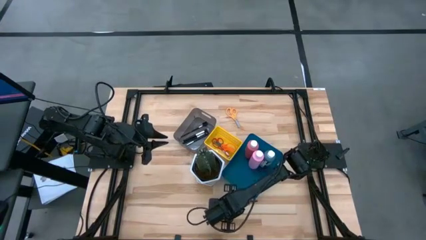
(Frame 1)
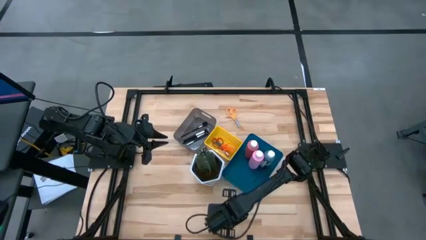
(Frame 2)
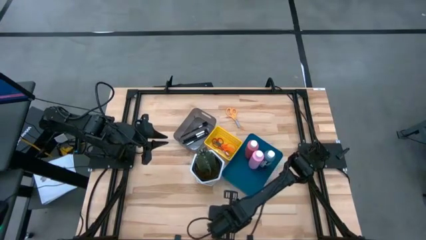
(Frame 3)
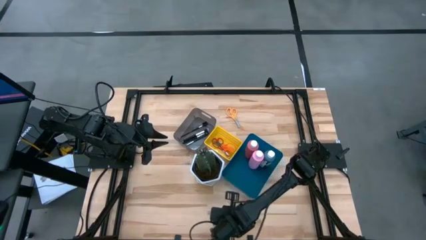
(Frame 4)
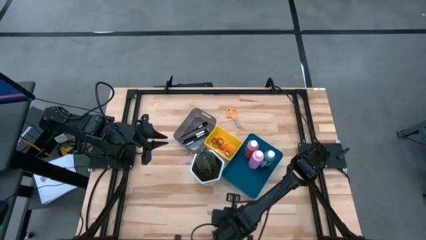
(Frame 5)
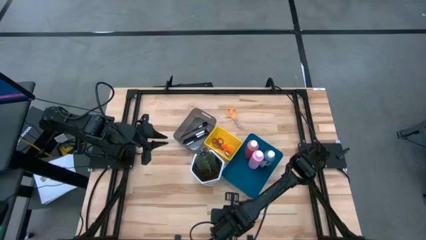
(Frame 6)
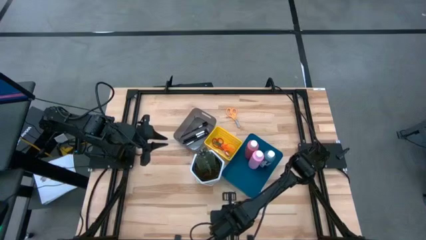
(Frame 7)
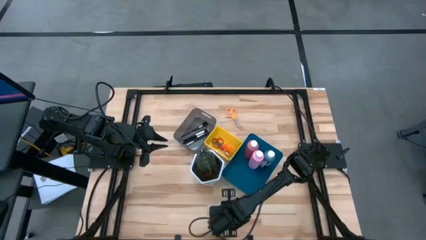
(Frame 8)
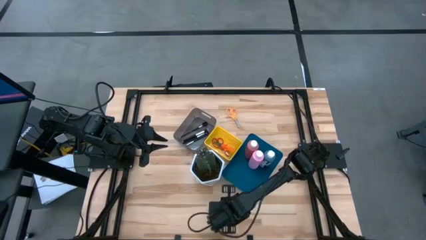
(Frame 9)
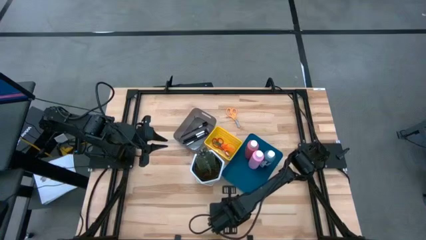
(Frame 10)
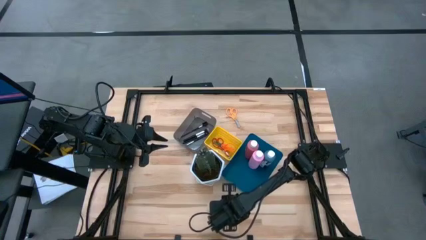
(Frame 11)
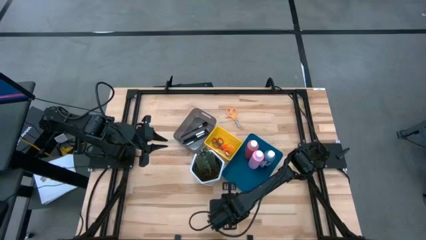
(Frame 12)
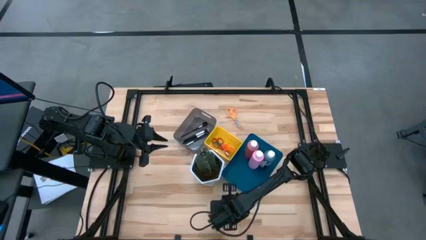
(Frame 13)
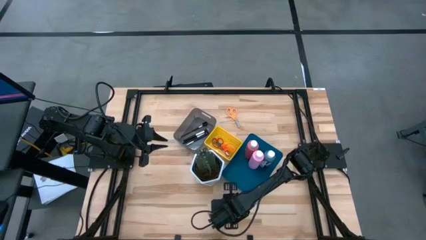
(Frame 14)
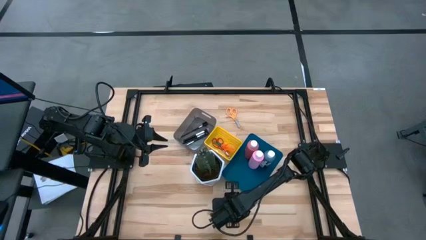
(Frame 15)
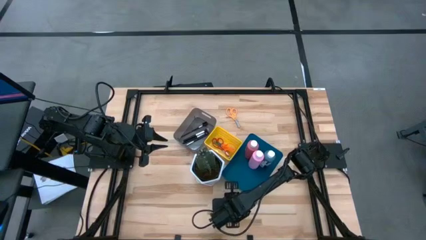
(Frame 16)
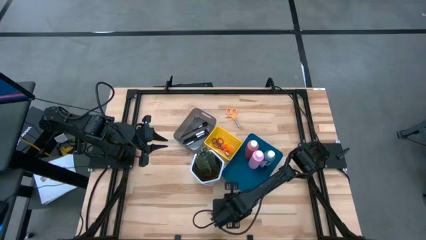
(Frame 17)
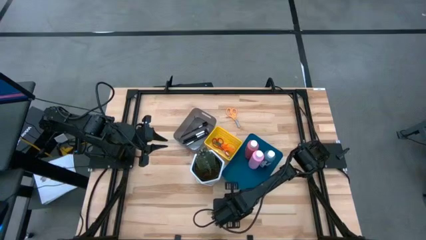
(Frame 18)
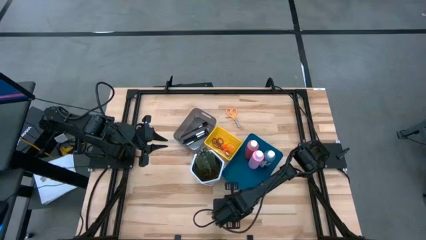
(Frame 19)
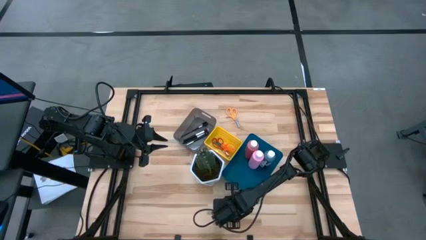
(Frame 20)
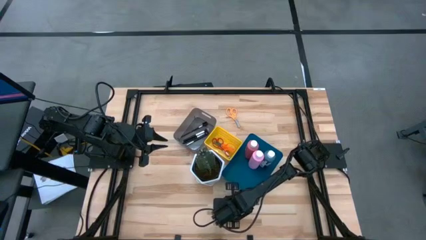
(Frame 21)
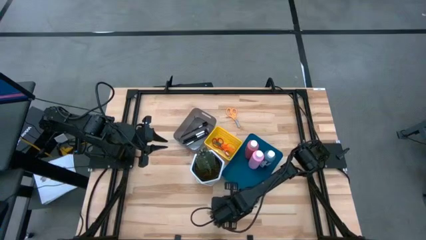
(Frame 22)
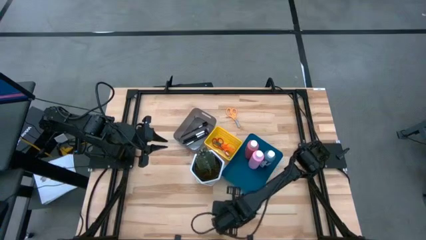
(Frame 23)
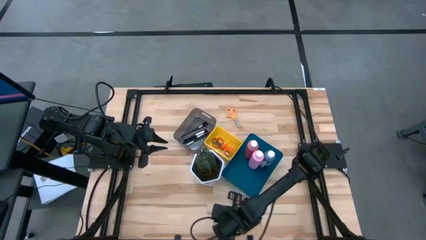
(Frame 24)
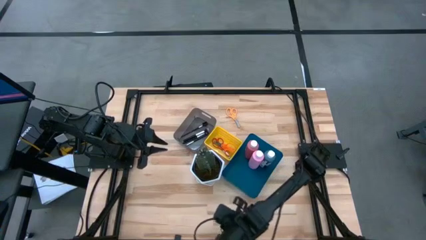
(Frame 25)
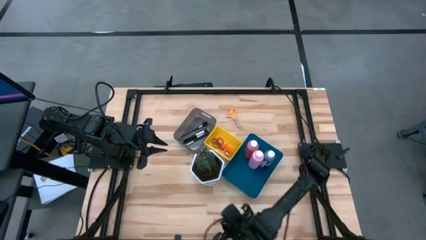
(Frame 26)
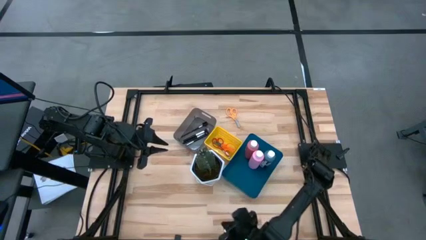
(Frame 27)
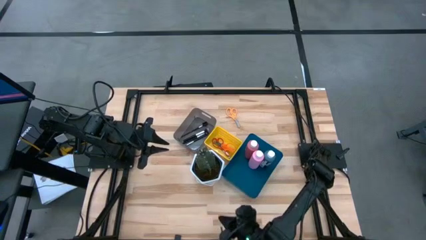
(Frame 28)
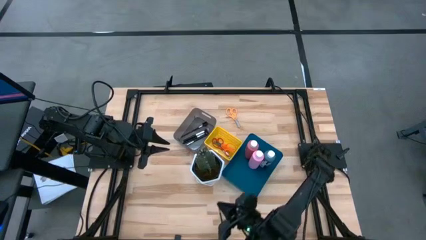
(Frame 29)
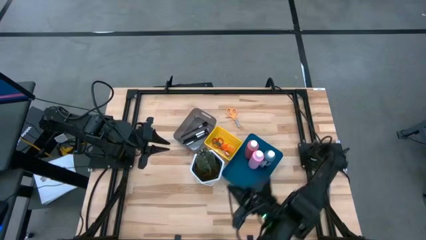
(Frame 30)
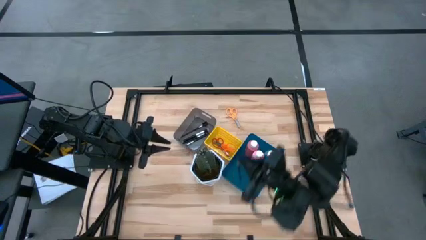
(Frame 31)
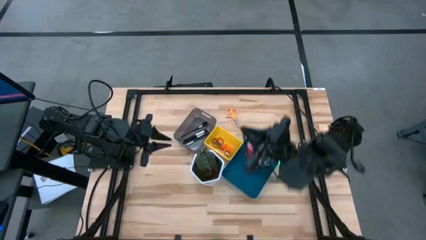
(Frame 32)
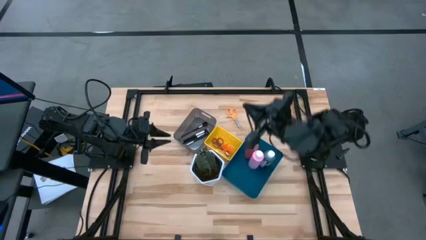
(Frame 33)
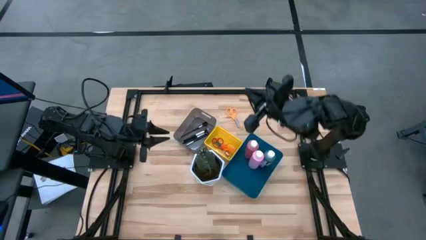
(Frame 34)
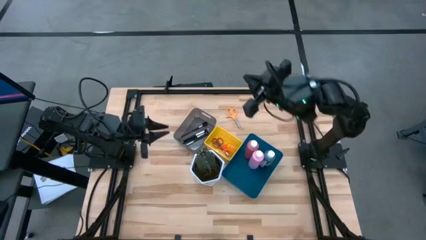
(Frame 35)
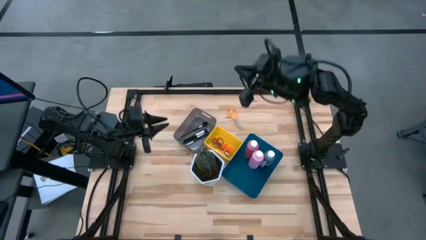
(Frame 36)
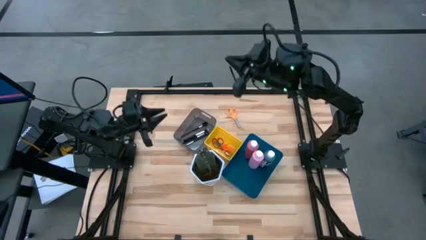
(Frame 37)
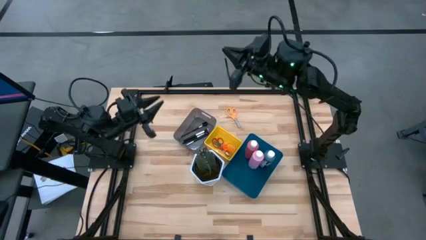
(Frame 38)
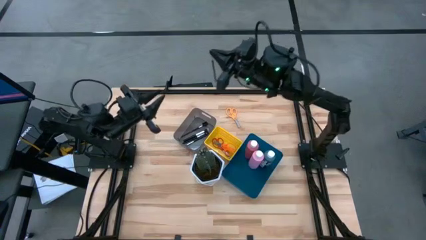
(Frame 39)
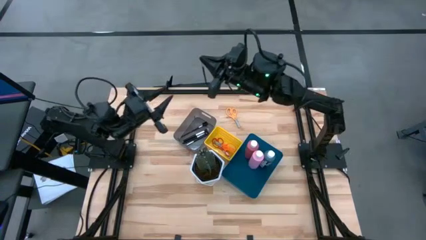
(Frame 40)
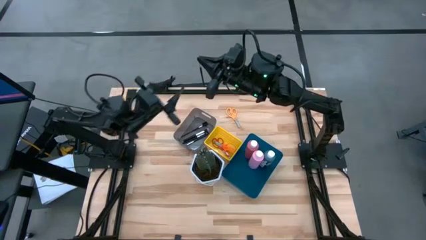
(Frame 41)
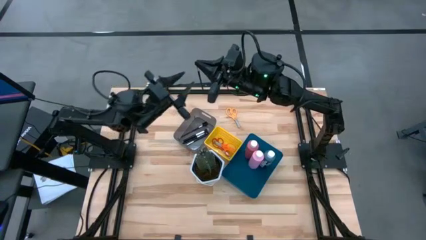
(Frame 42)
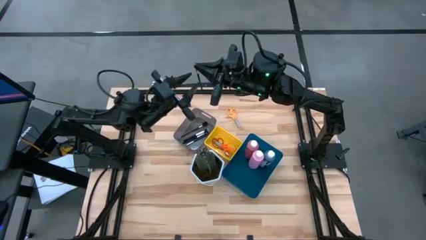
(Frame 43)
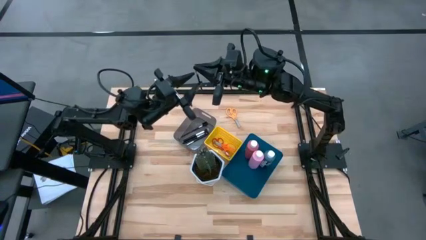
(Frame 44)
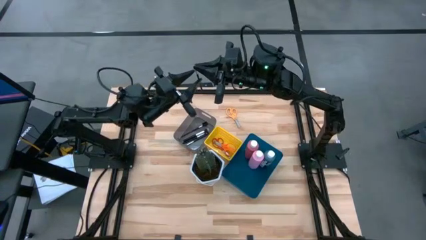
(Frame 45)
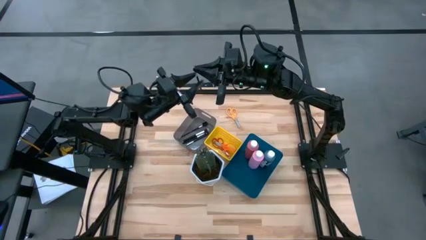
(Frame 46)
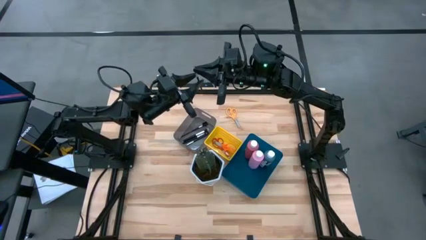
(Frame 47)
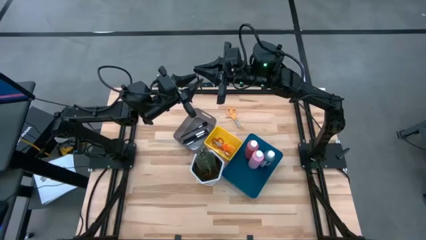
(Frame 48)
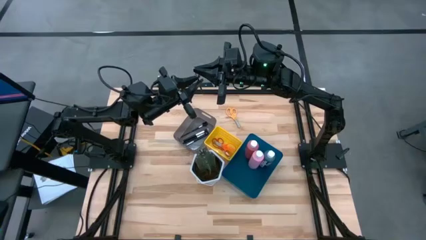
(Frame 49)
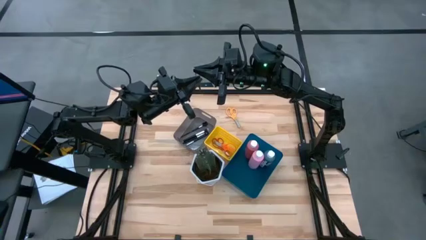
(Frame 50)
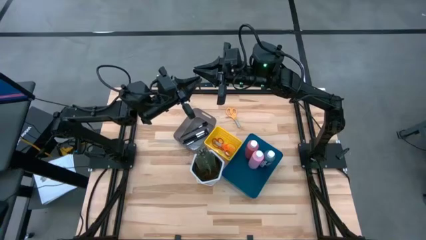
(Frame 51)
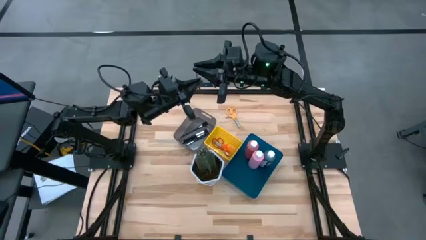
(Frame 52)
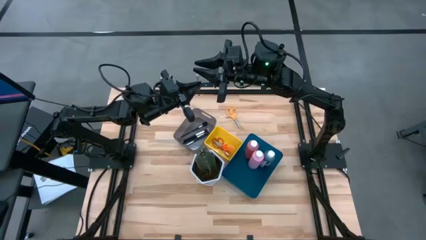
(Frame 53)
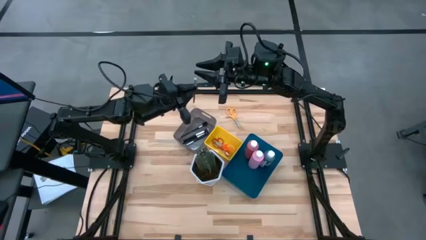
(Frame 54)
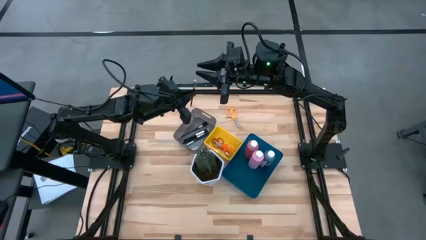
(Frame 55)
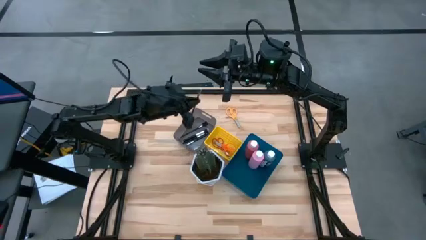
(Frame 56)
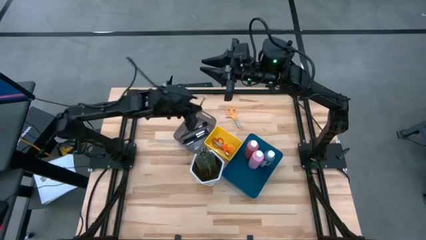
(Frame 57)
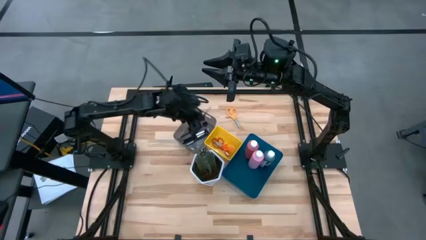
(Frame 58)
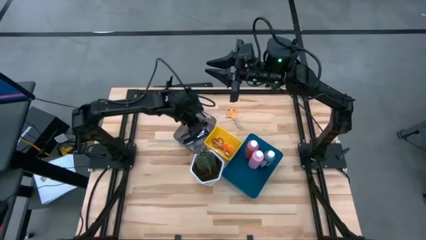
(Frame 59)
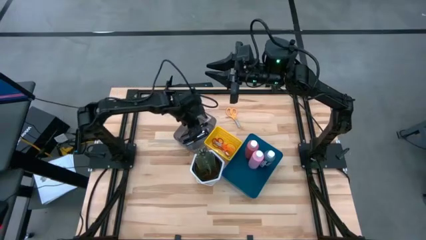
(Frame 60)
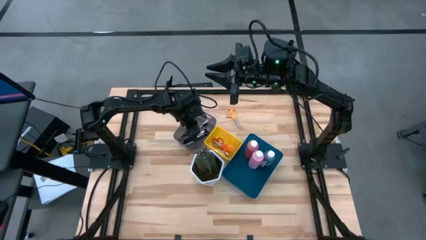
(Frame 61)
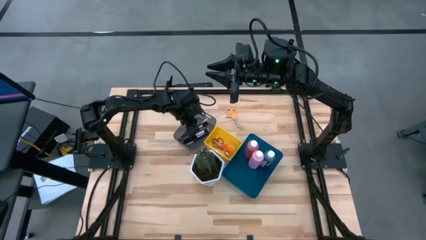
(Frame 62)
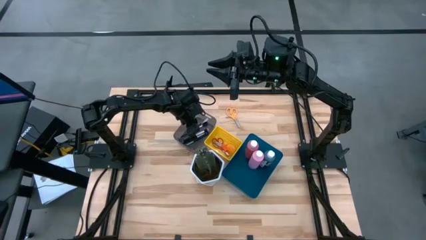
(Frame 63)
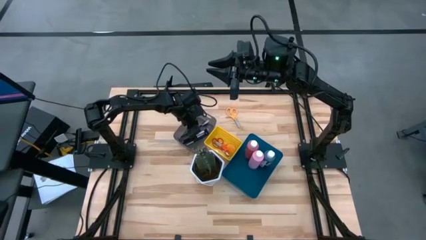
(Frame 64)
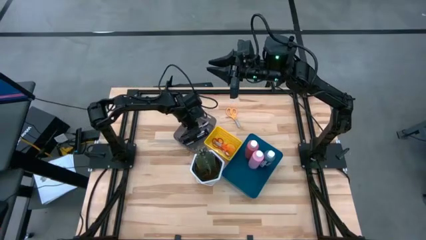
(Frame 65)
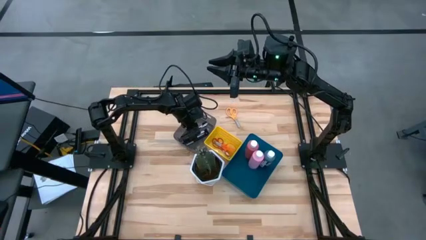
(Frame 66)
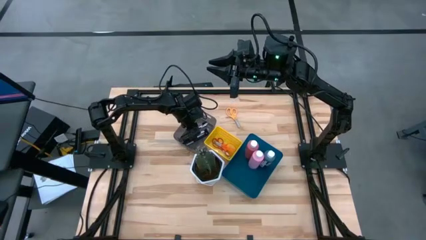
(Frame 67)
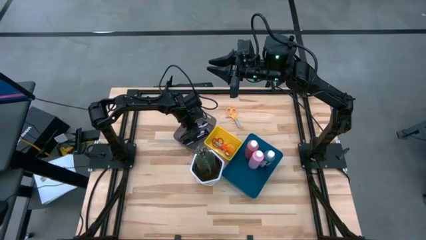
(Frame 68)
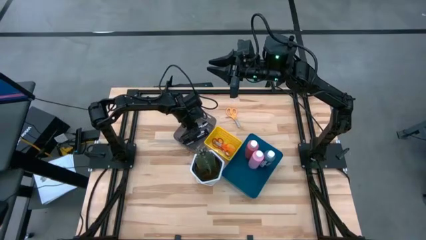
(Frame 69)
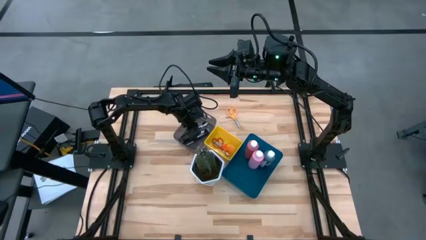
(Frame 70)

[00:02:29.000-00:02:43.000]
Task: Pick & Place Paint Supplies
Put the makeup brush into the black bin

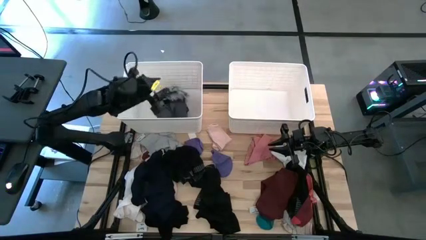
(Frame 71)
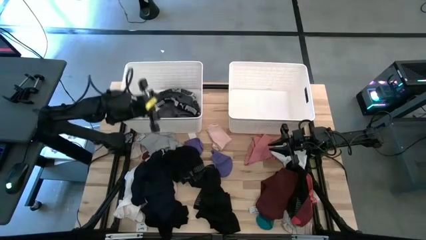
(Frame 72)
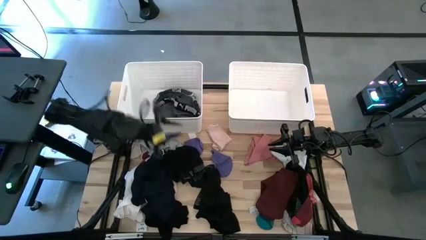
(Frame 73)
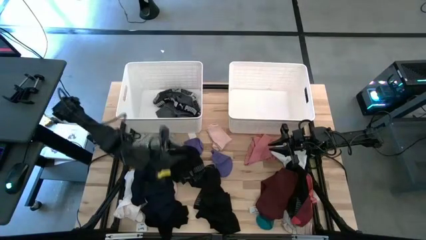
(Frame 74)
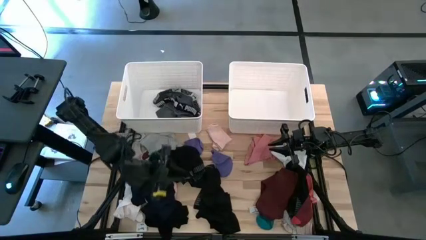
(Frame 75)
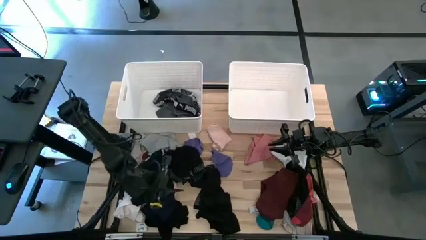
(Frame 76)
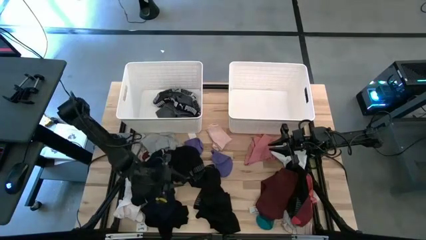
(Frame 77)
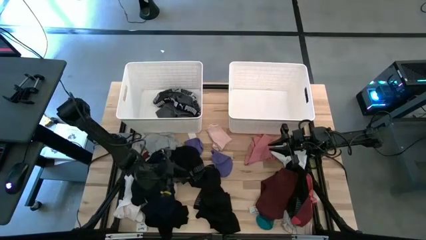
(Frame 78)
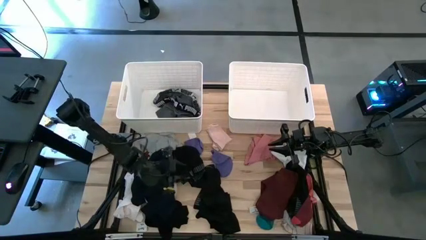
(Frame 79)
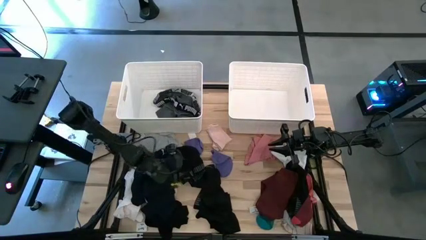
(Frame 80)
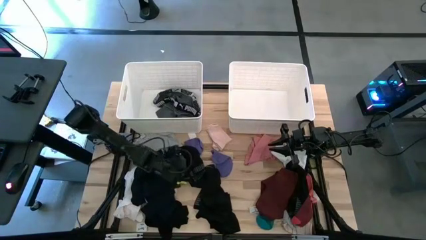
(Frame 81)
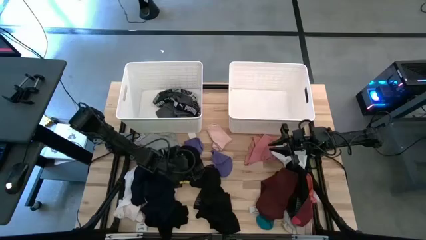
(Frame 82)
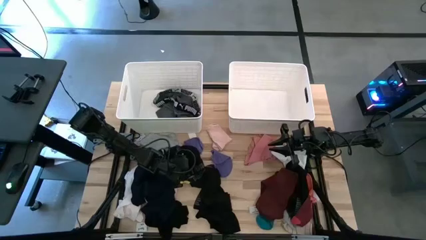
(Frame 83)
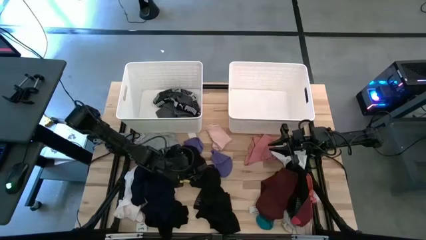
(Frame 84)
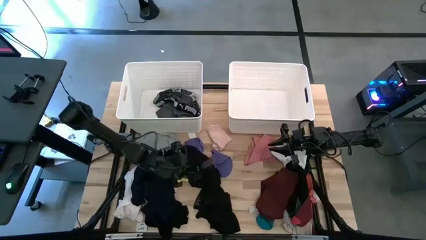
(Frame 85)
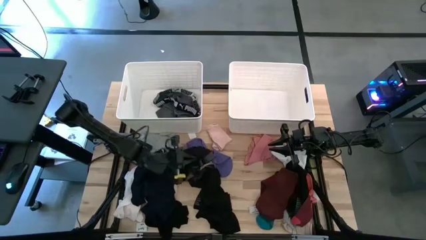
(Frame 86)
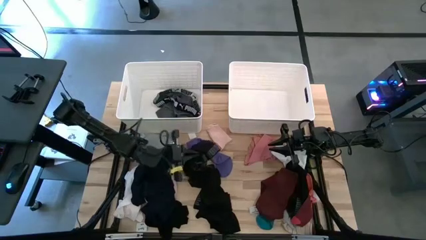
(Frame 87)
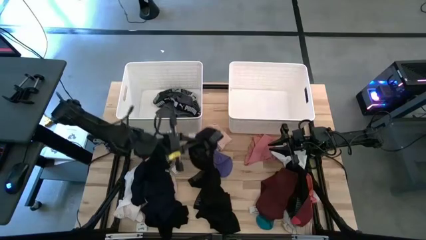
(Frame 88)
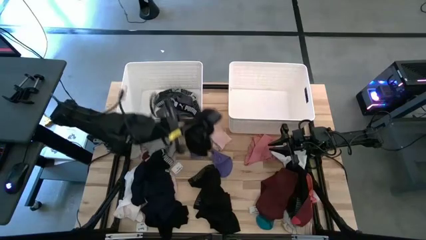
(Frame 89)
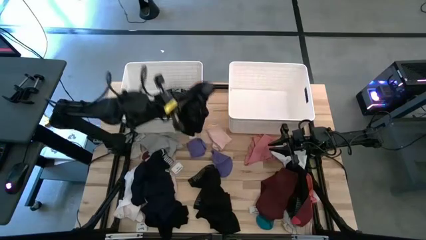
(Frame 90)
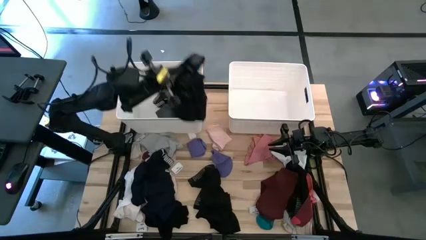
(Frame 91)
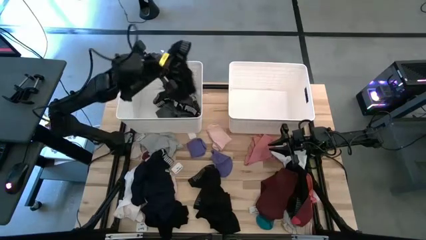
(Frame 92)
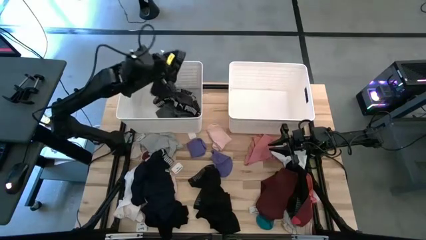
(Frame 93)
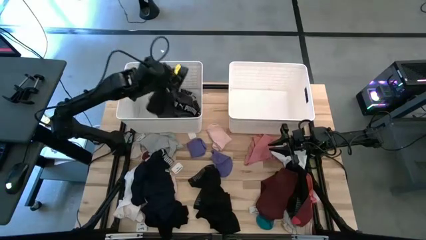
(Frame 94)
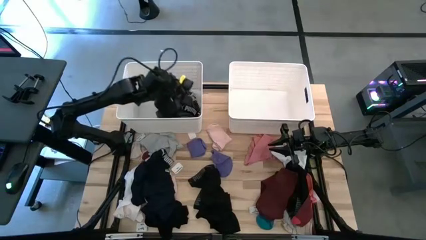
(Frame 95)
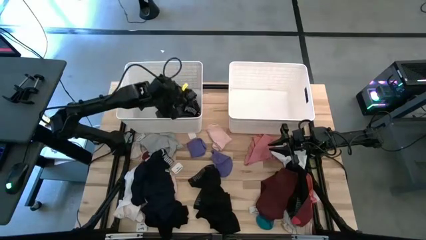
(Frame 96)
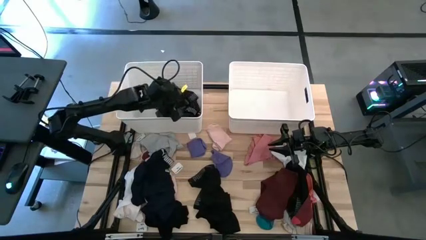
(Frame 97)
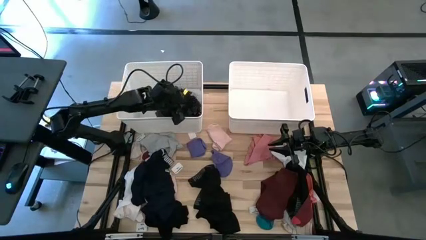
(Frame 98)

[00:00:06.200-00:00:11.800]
Task: Sort clothes
Put the black boxer into the left white laundry bin
